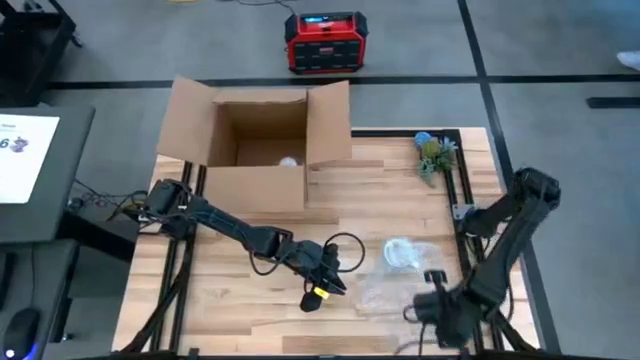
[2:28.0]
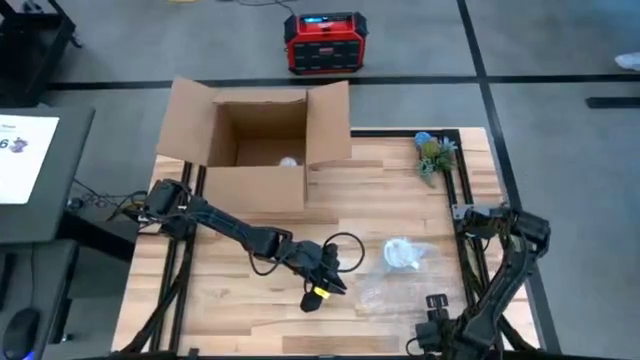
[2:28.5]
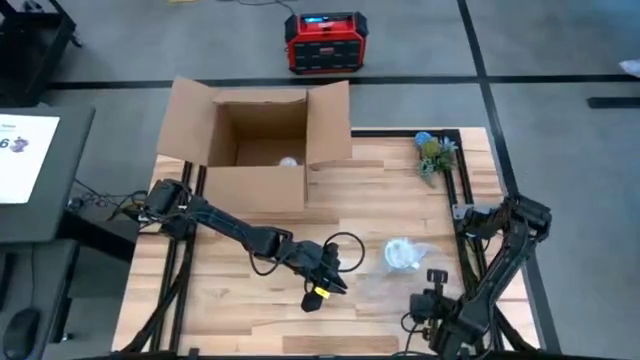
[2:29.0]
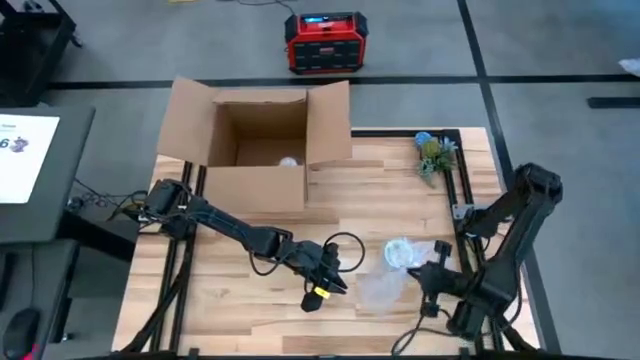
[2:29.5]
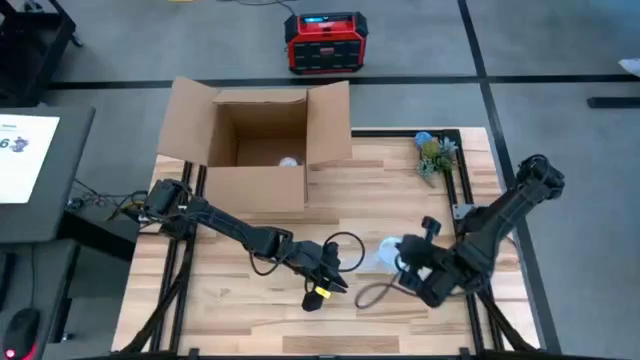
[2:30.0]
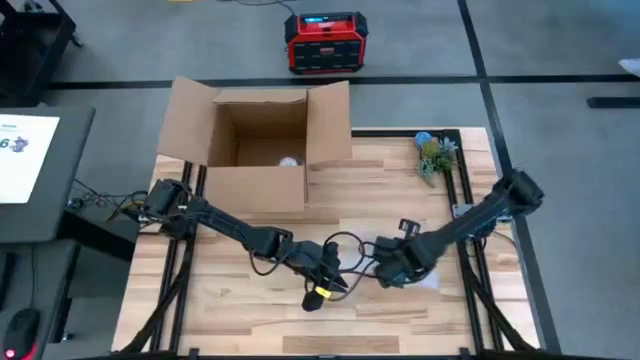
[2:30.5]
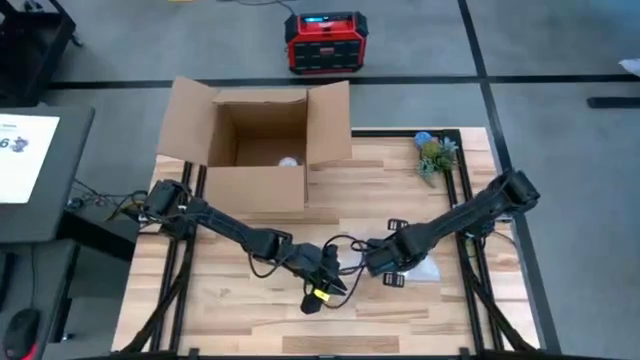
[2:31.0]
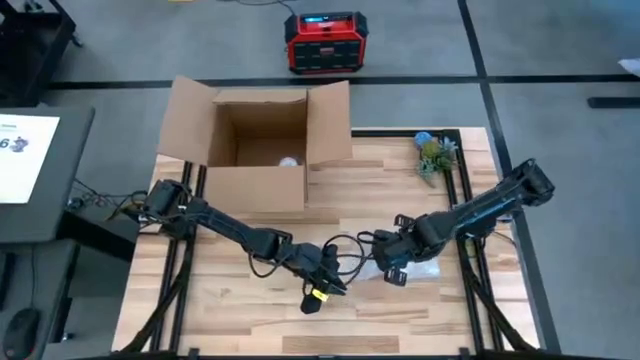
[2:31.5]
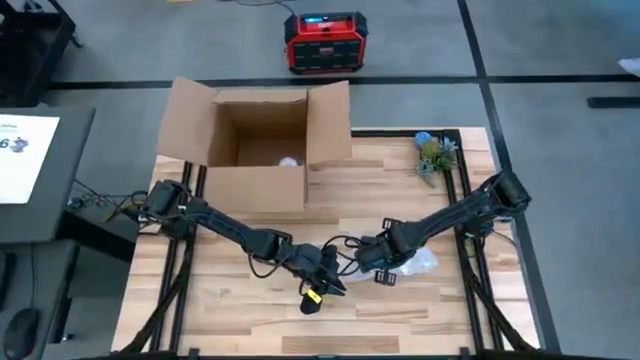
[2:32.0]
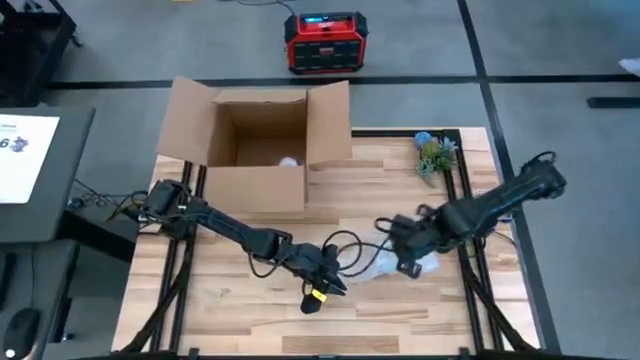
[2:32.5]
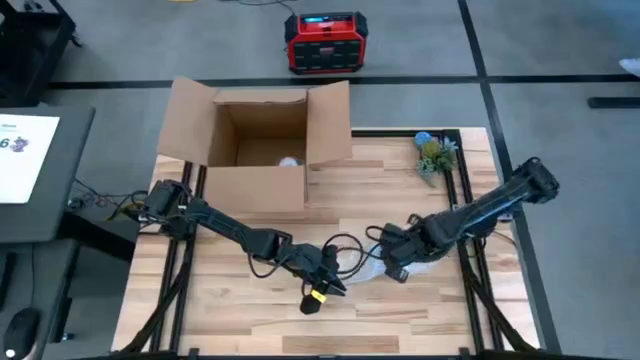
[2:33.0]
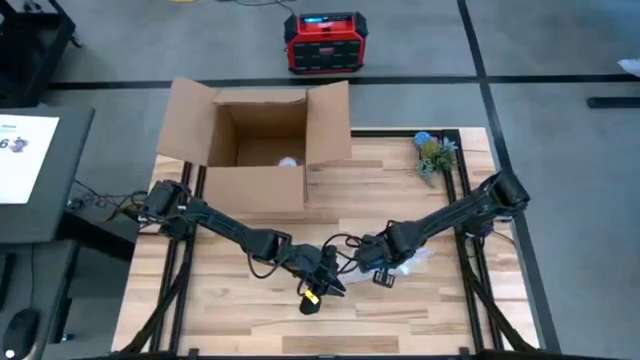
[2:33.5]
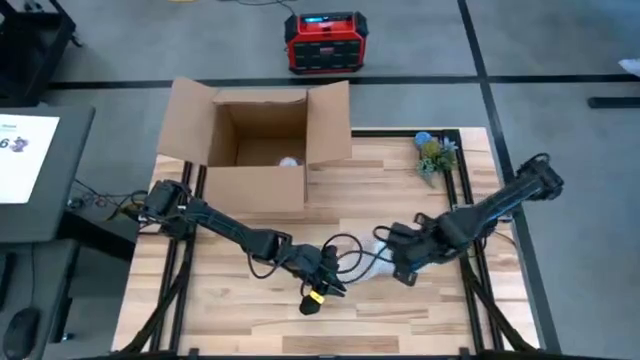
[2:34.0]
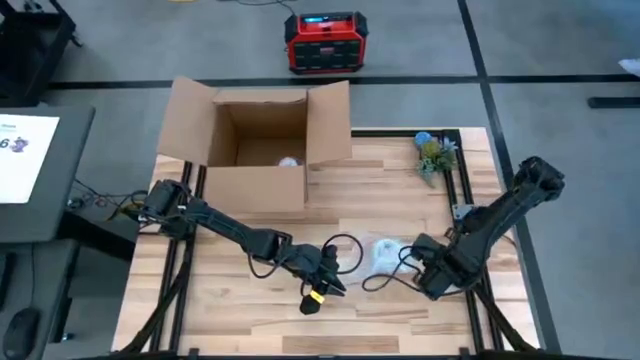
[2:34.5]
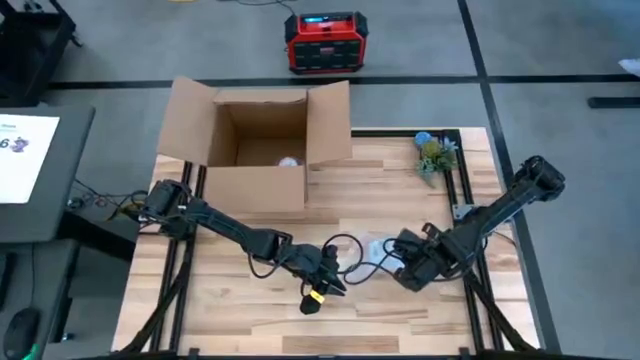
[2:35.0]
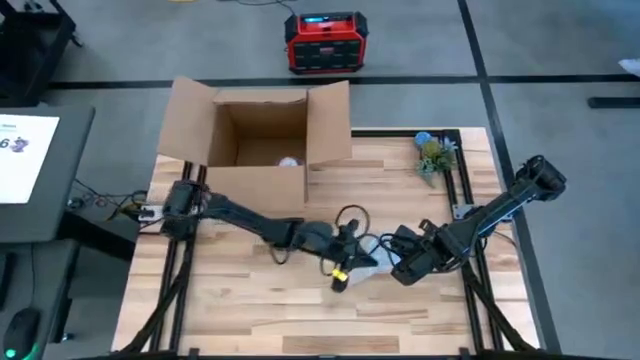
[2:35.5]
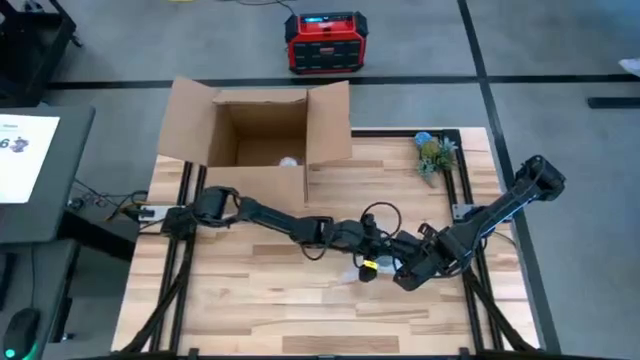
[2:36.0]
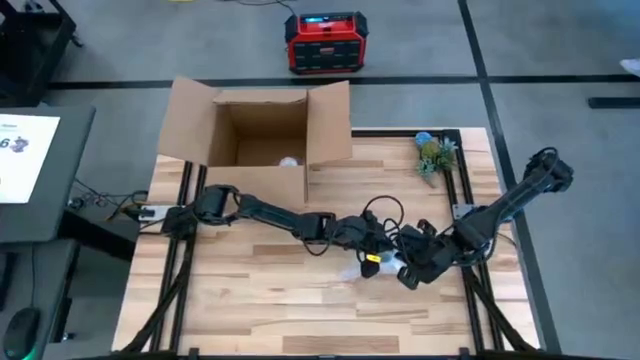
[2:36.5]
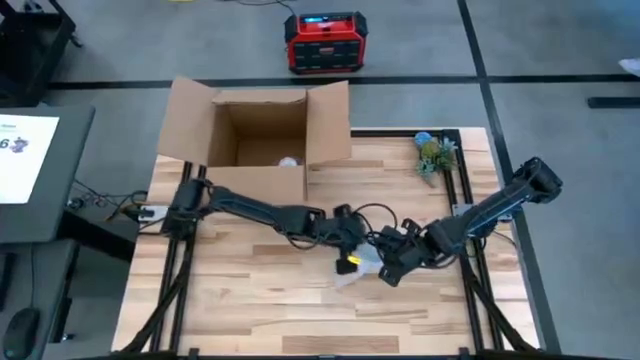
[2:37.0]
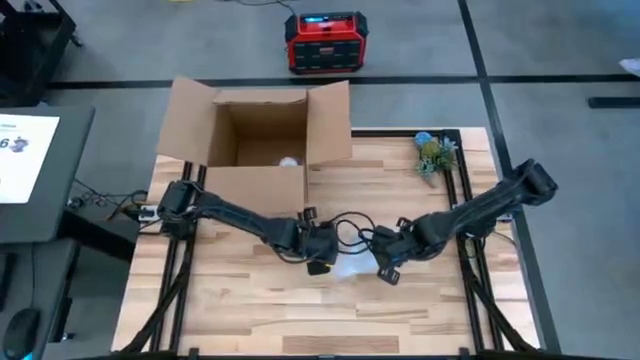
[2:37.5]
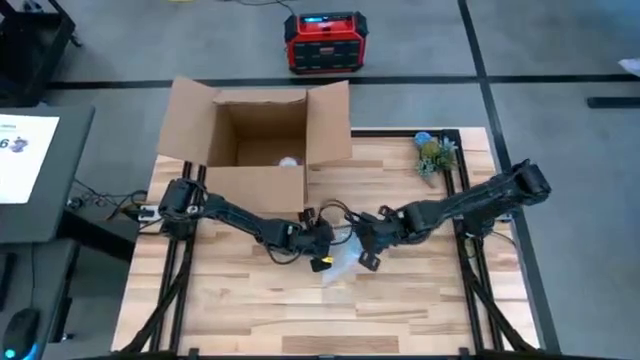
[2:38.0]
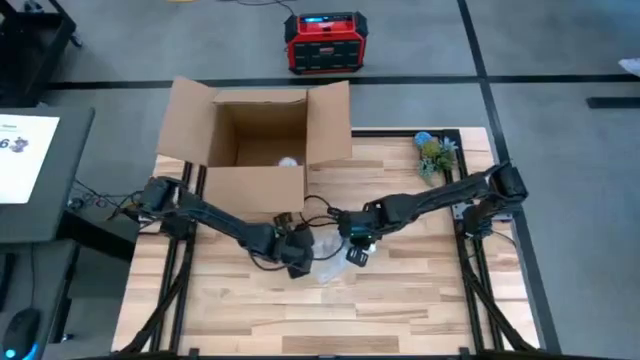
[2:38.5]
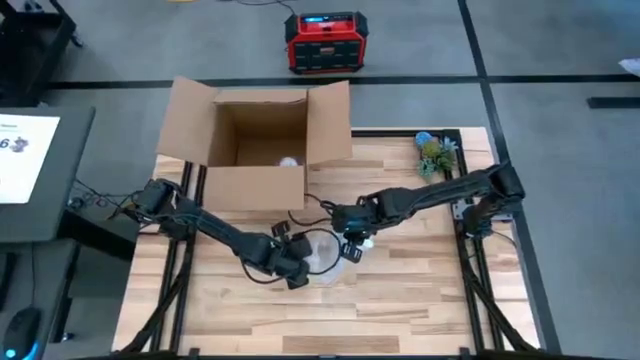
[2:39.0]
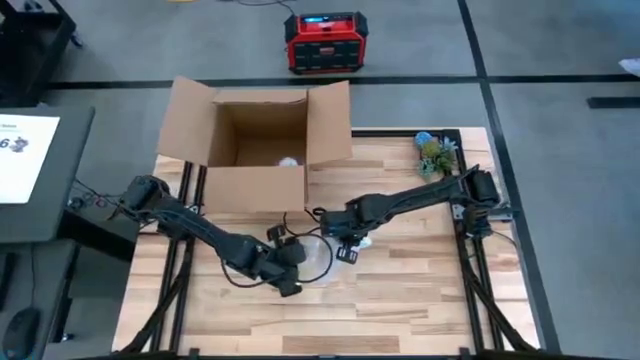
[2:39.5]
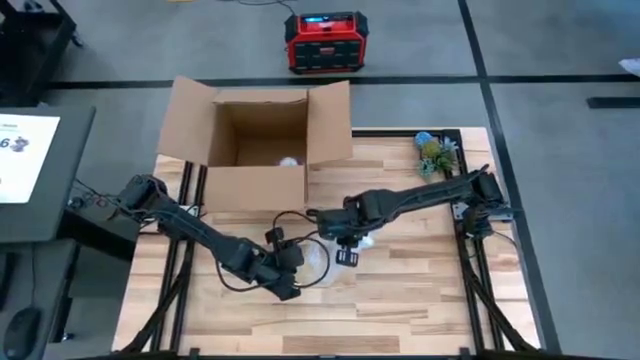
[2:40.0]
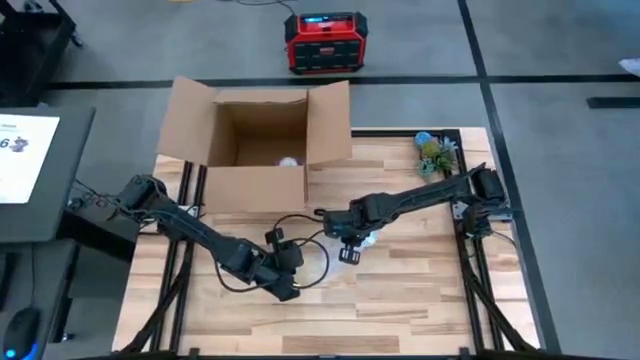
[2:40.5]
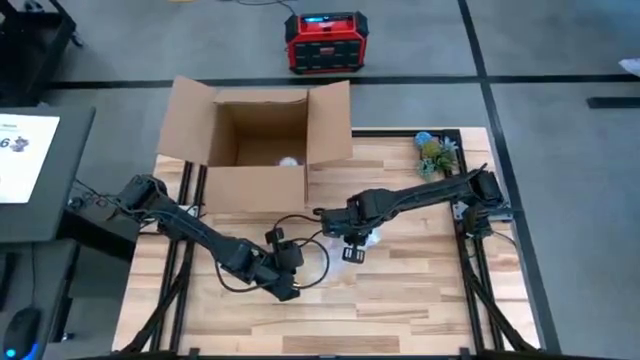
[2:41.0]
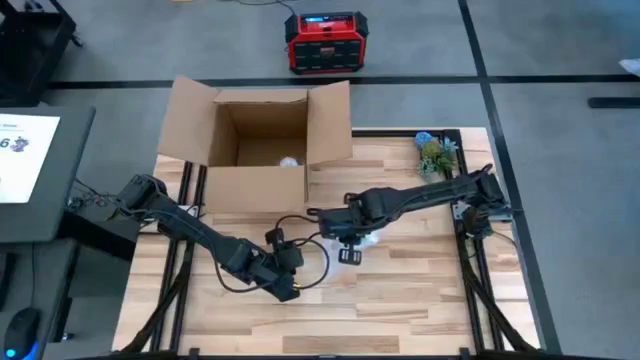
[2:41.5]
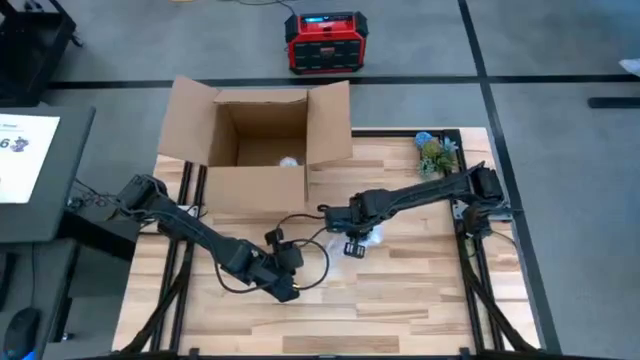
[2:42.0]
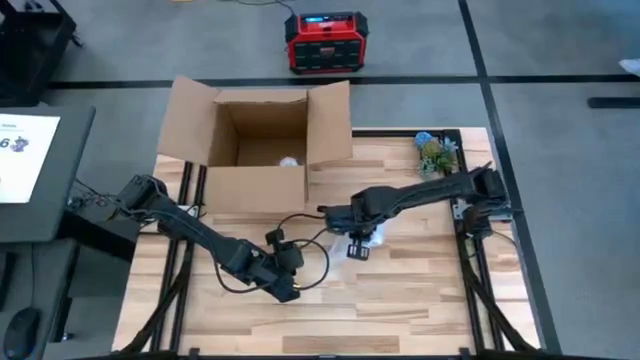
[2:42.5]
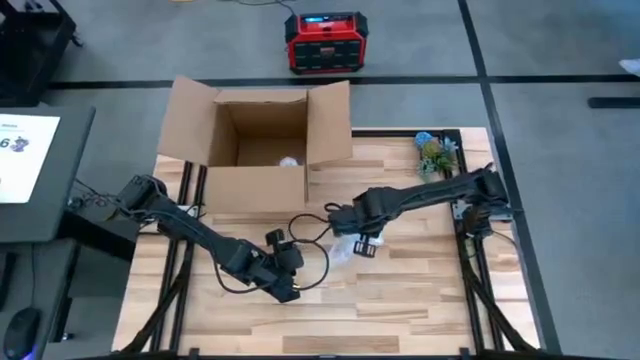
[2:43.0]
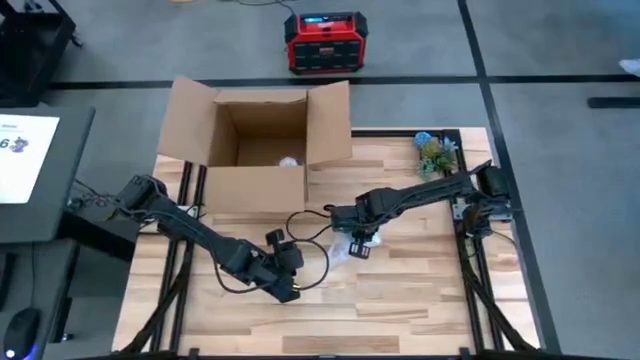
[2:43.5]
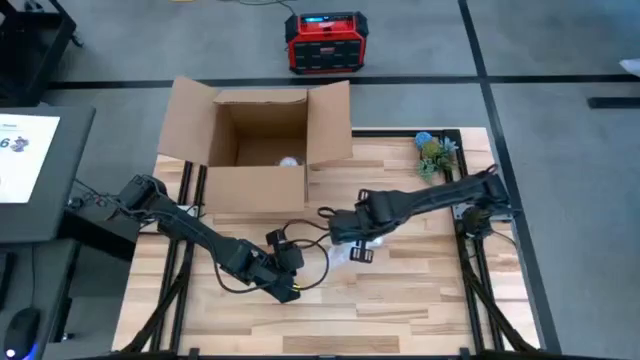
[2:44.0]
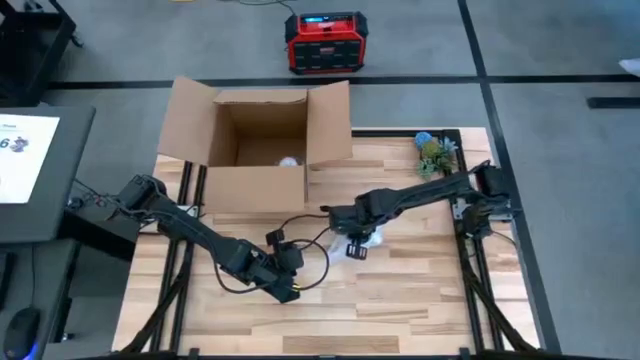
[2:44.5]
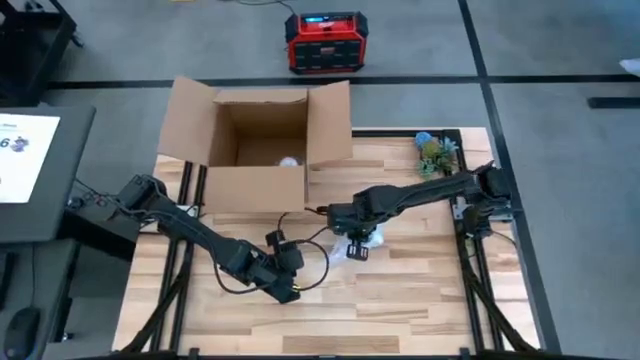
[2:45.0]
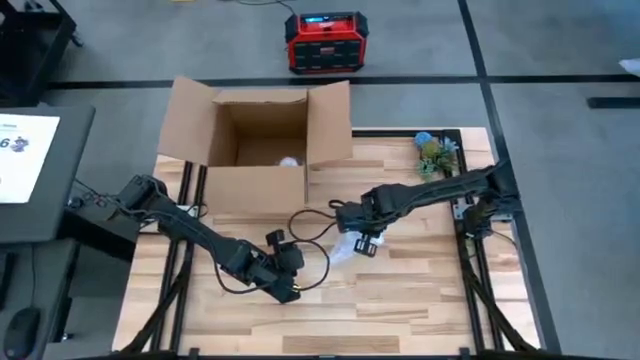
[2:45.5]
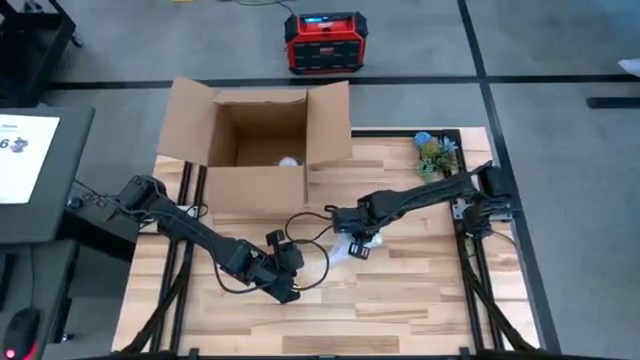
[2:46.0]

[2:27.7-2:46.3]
Task: wrap mug
Wrap the green mug with bubble wrap

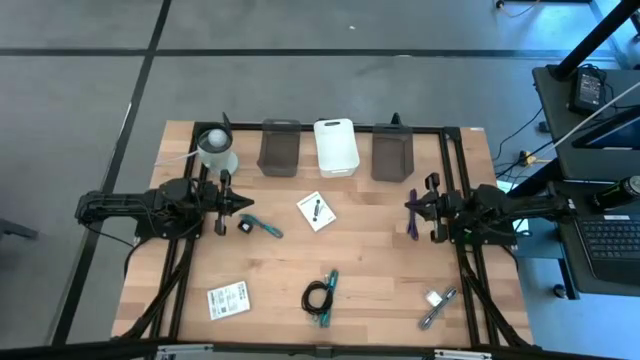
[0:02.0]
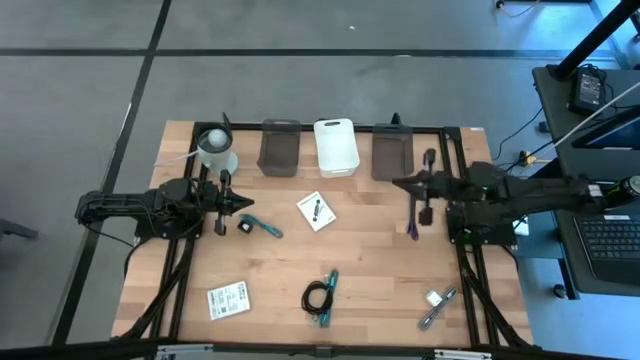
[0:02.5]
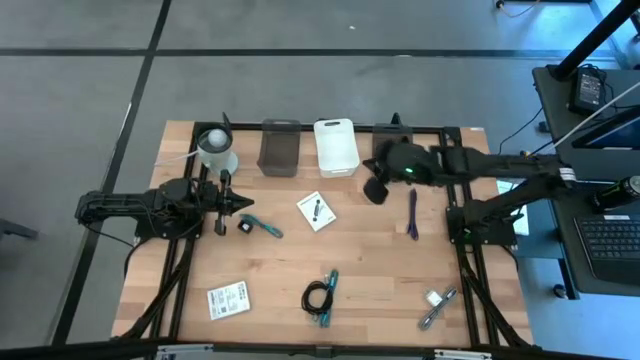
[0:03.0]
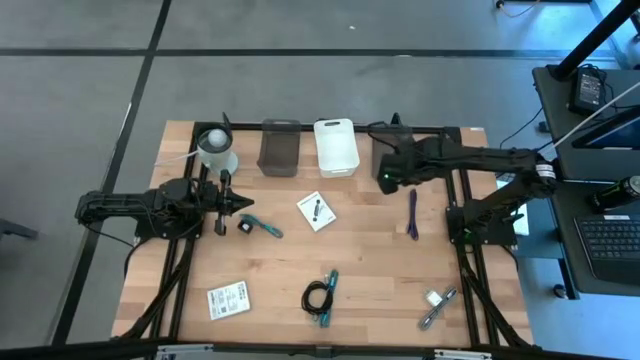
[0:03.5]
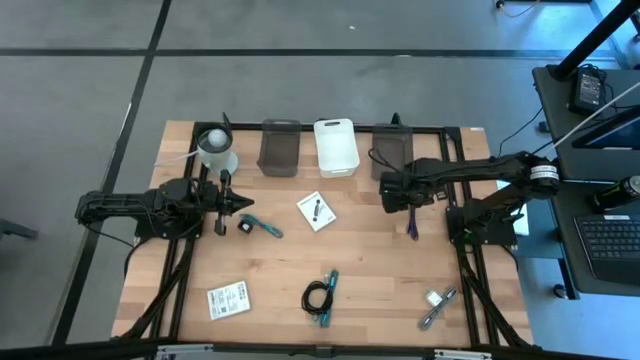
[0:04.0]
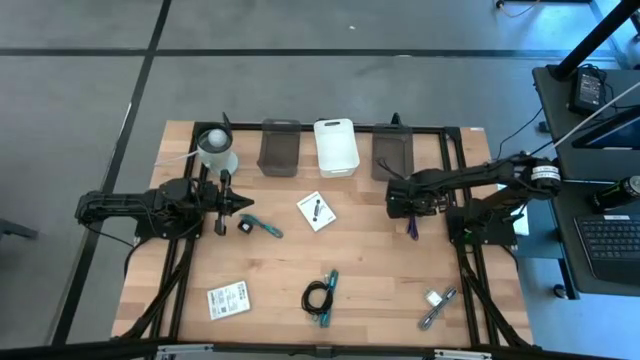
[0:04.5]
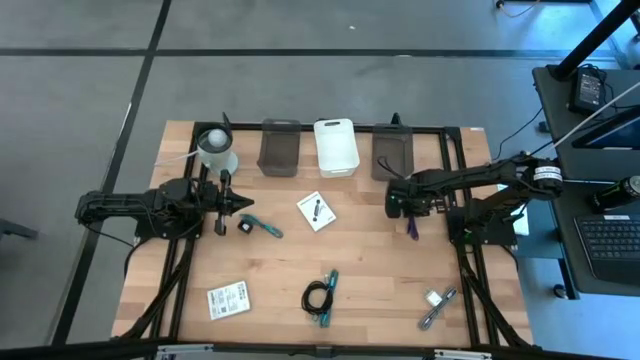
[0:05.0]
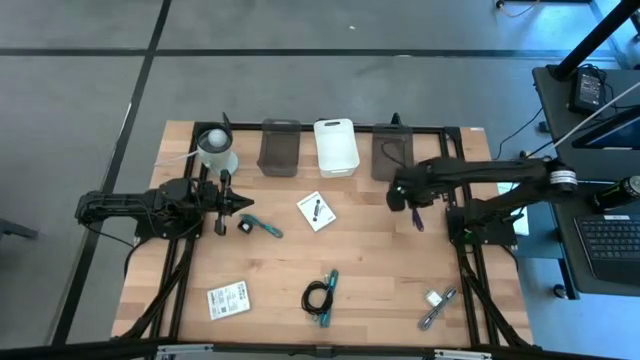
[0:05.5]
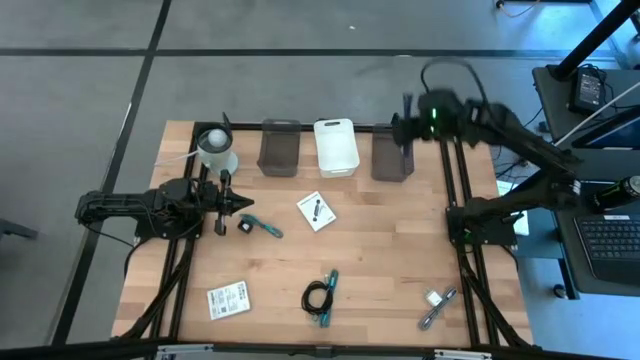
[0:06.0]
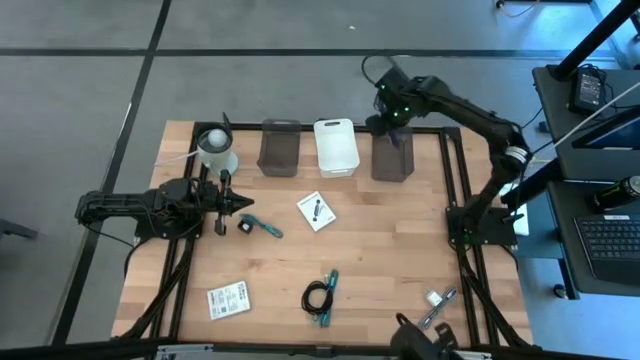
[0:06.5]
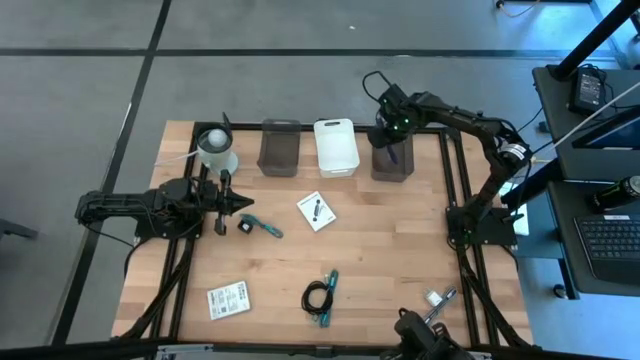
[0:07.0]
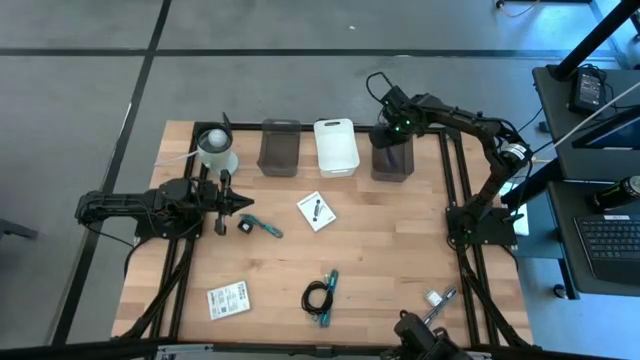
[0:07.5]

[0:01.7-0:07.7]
Task: Pick and place items into bin
Put the violet charger cable into the right black bin
